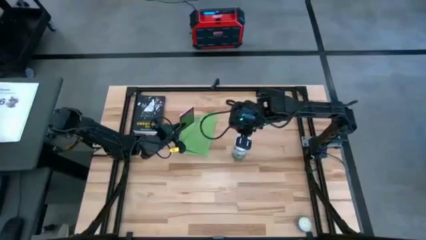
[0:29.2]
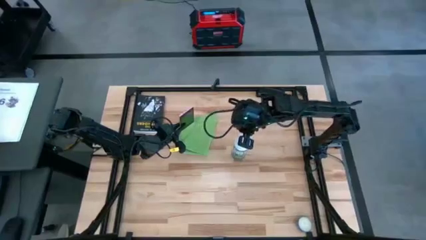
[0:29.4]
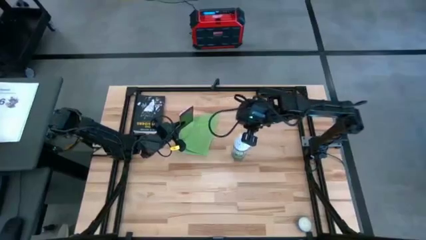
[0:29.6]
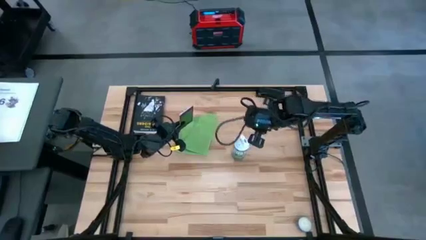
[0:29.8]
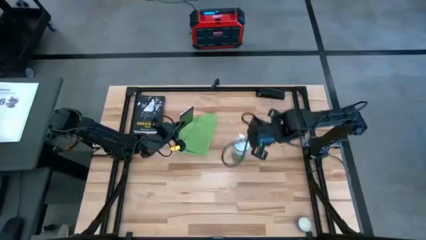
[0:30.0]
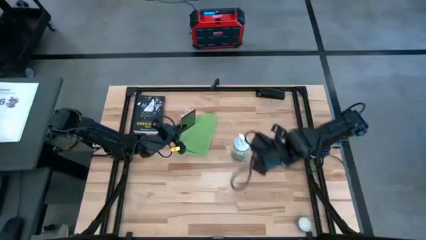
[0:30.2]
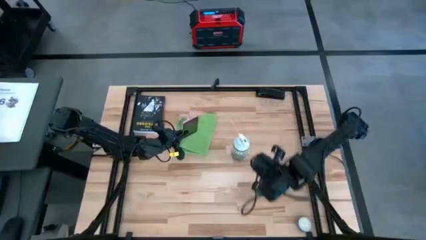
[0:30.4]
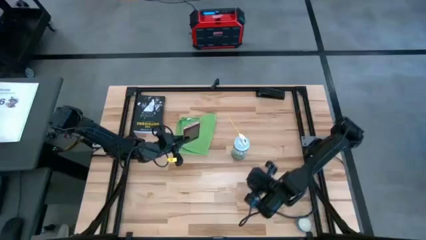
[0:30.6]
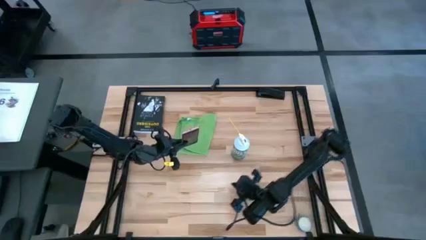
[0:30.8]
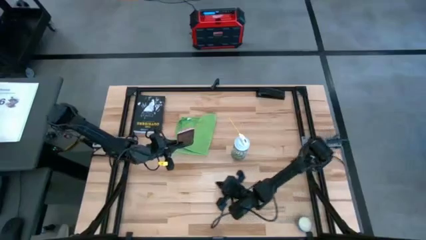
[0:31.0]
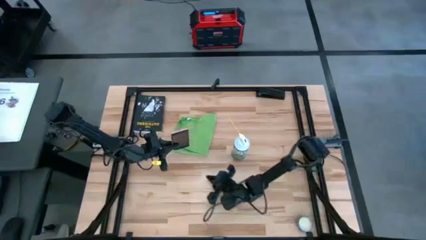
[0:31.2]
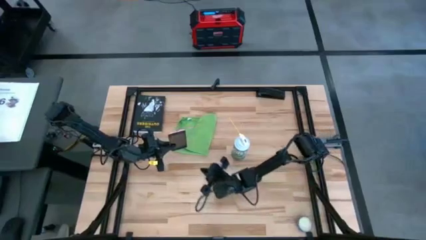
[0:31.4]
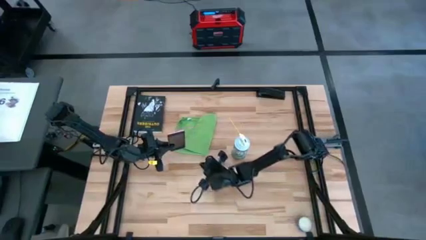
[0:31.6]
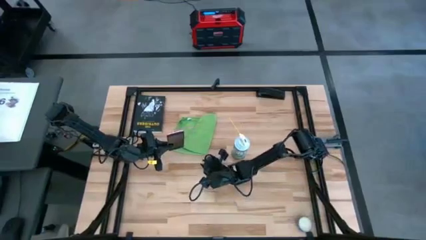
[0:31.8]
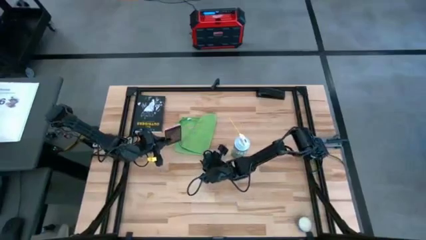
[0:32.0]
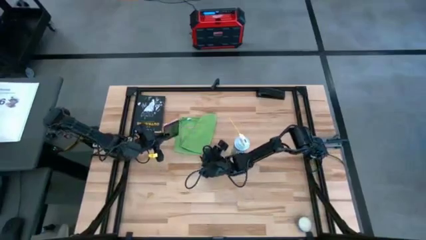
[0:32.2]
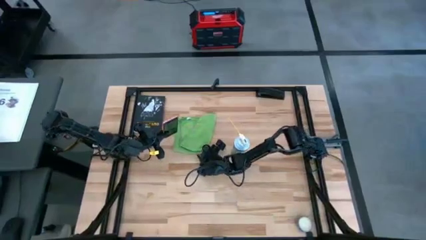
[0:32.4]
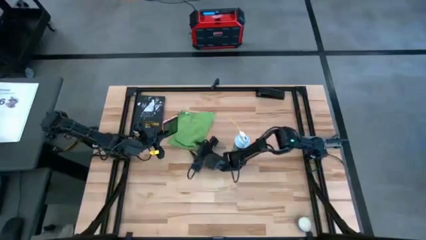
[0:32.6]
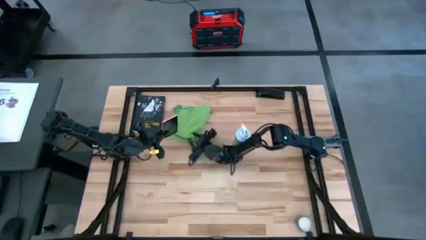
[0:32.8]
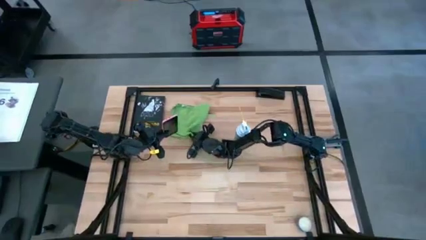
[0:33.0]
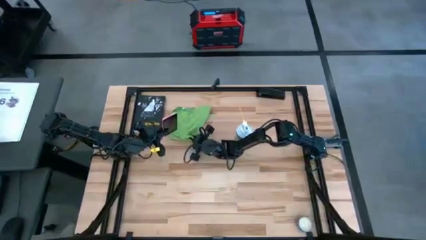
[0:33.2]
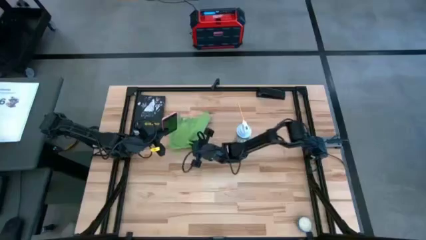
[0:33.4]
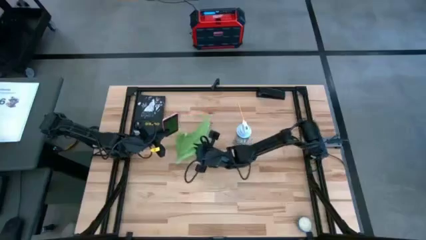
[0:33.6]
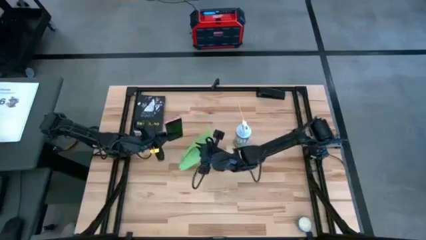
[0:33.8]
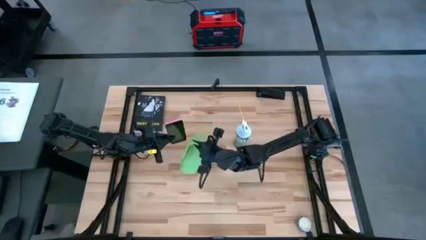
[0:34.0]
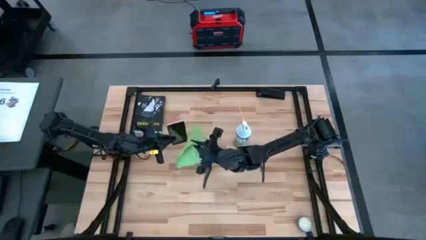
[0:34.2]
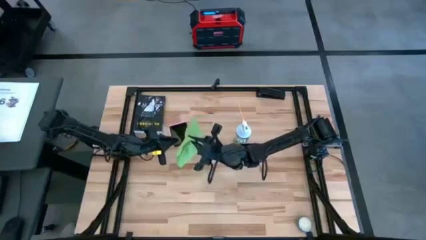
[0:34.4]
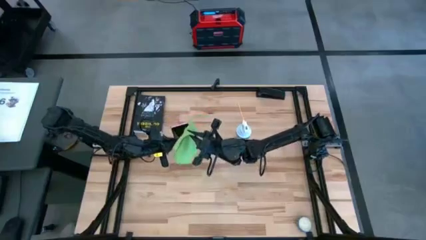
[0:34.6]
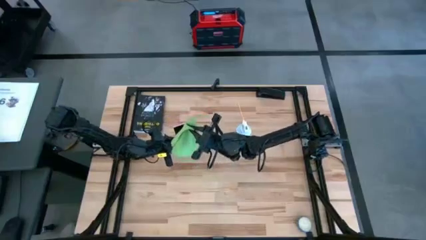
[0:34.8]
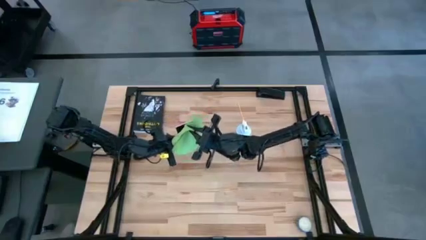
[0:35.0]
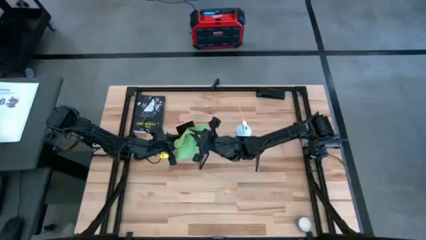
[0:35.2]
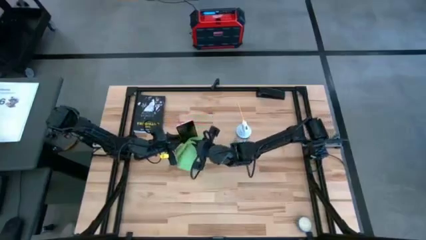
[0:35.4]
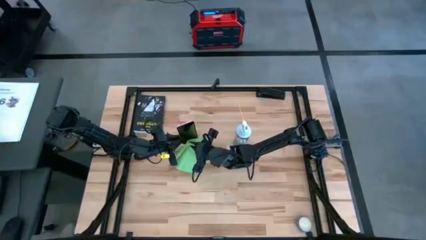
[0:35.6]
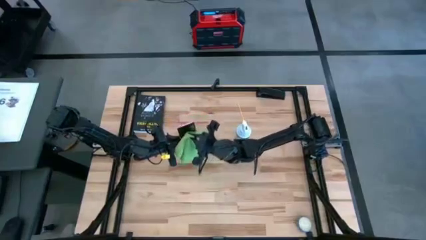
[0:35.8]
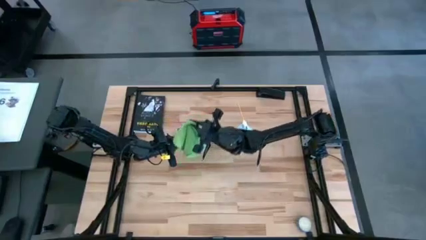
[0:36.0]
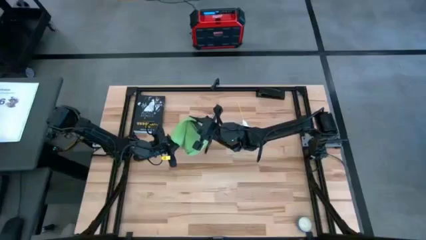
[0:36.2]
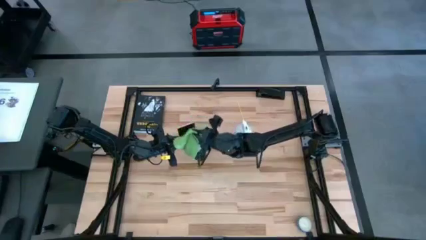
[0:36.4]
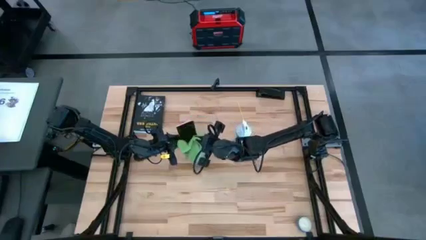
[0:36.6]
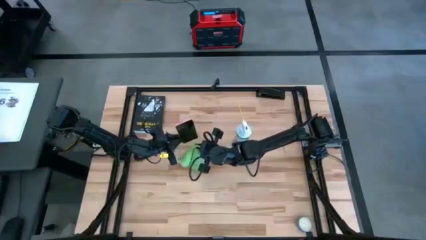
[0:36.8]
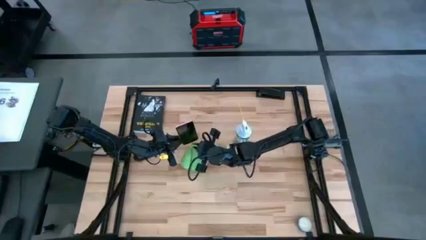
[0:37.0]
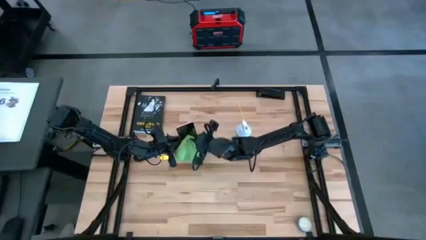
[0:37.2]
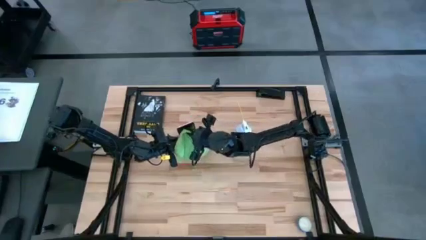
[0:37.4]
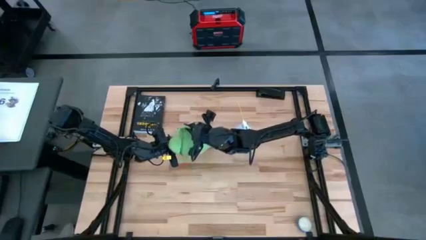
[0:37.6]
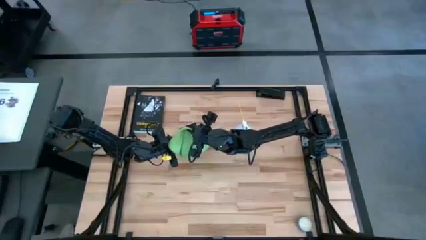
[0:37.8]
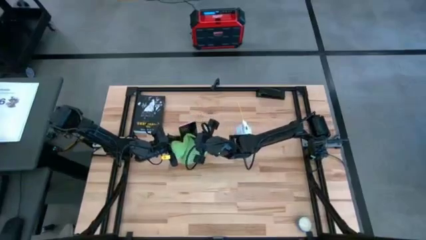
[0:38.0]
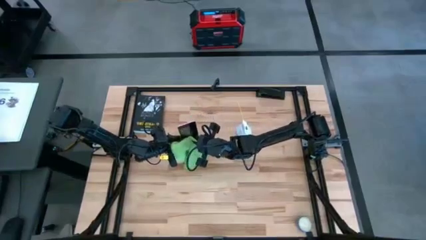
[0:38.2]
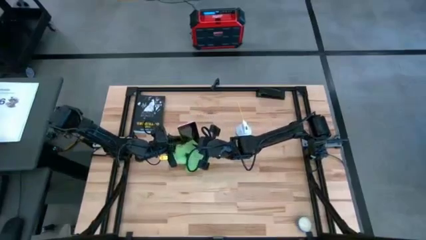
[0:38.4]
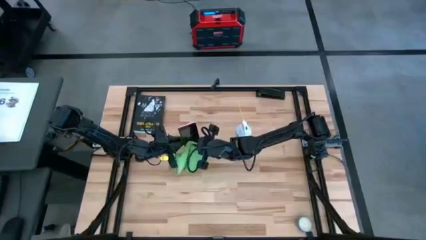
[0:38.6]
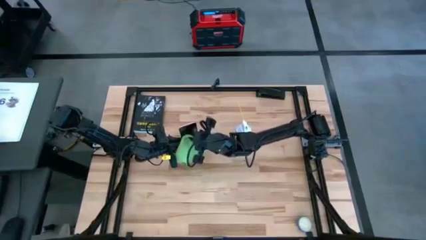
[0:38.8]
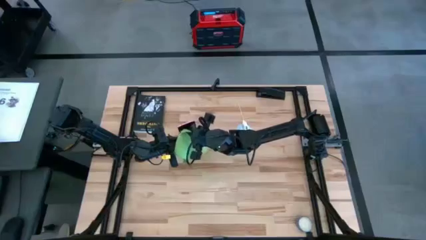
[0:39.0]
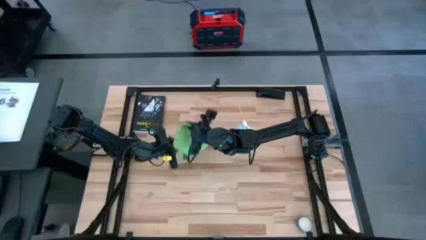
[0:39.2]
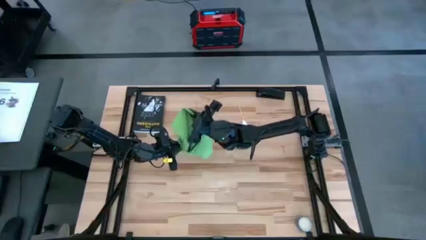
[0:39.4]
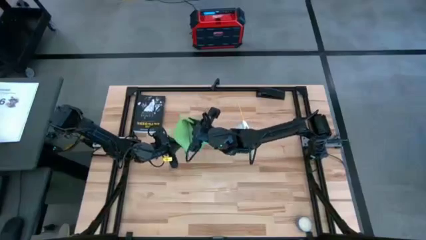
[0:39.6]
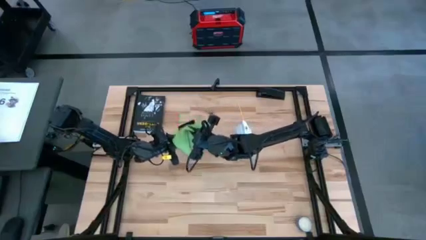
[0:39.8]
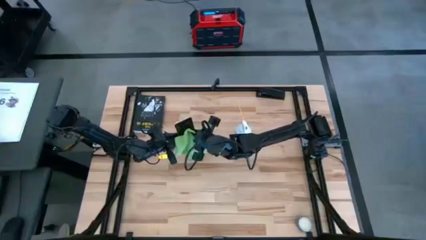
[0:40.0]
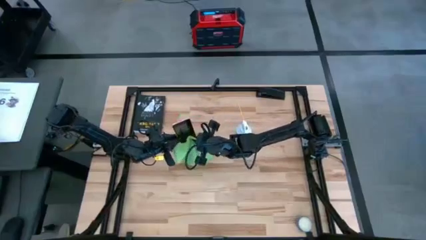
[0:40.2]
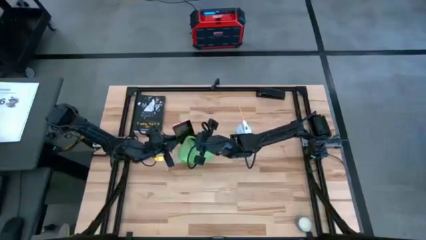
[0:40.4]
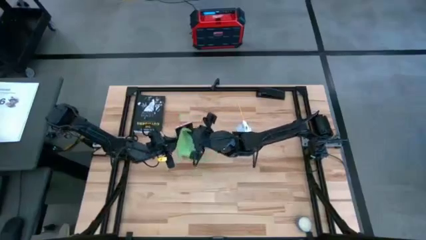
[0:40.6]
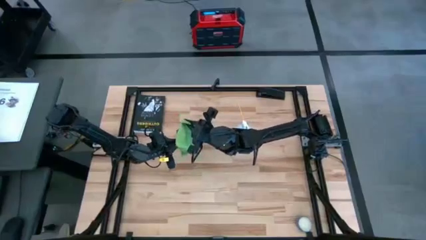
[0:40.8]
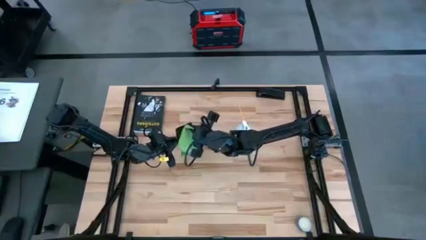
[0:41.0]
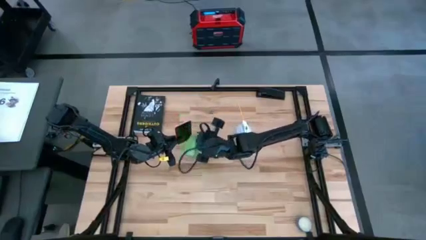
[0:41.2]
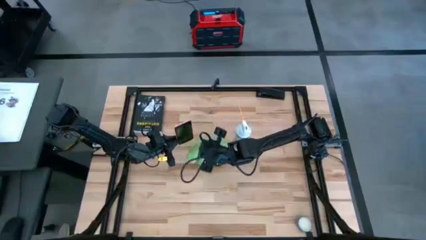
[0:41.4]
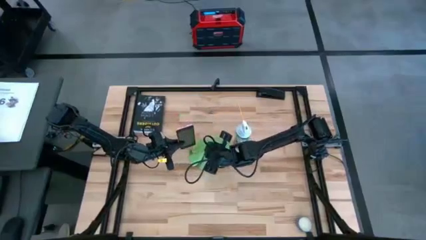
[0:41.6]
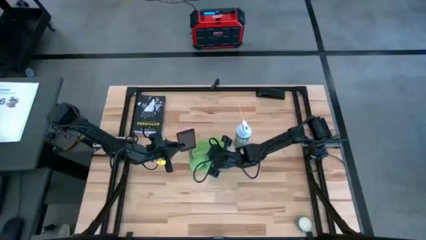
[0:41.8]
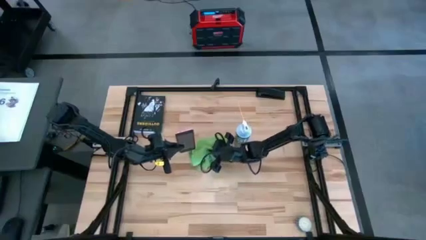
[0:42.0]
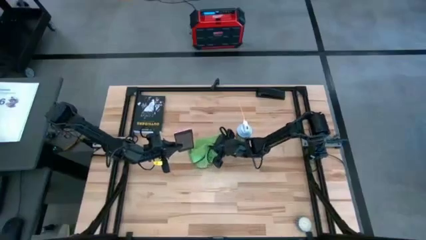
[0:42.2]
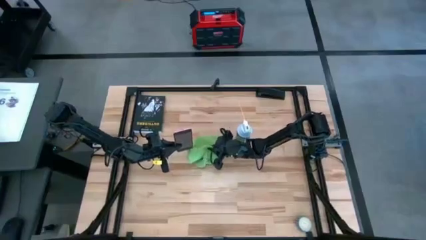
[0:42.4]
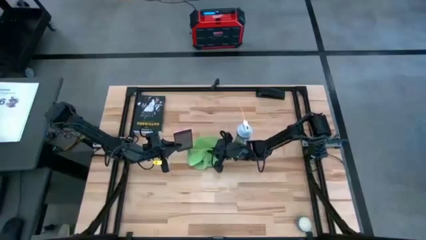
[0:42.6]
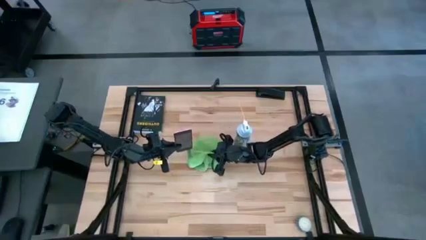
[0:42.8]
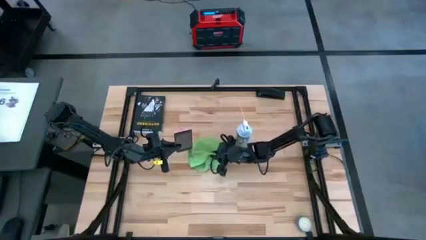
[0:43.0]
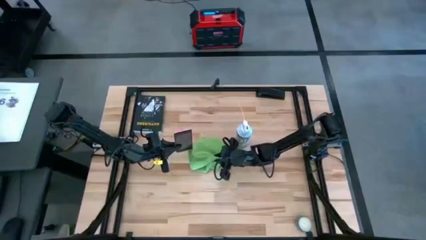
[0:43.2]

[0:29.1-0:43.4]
Task: Apply microfiber cloth
Wipe the pink cellphone with the green microfiber cloth

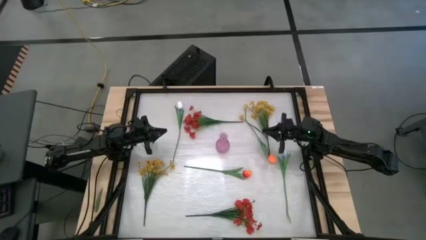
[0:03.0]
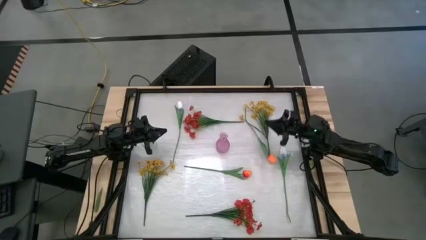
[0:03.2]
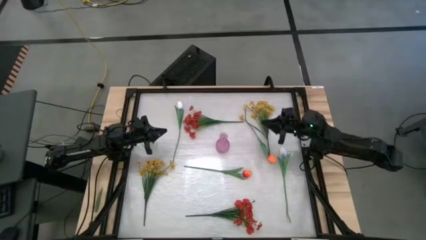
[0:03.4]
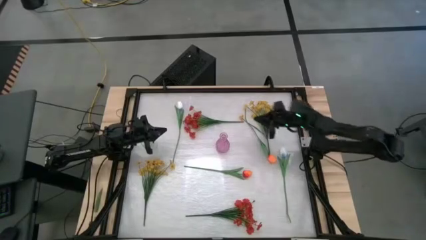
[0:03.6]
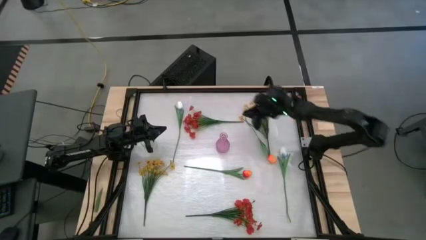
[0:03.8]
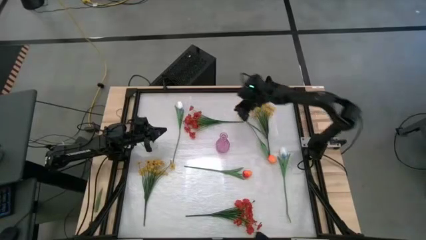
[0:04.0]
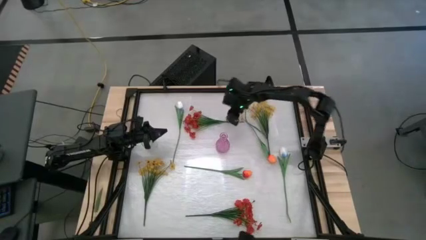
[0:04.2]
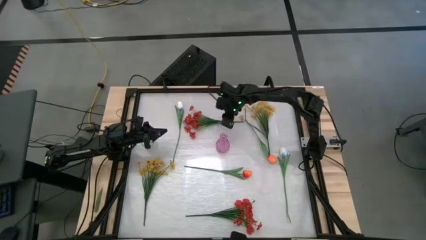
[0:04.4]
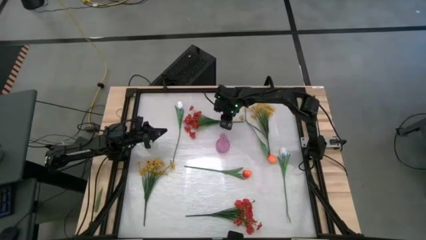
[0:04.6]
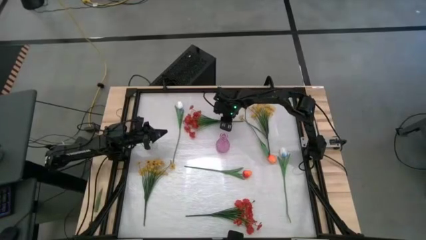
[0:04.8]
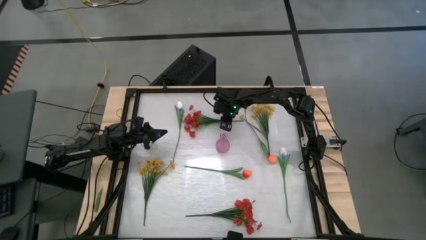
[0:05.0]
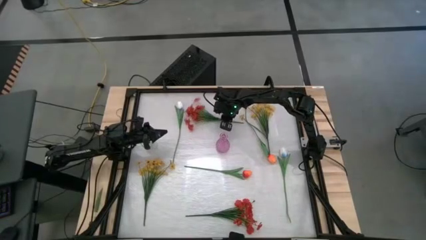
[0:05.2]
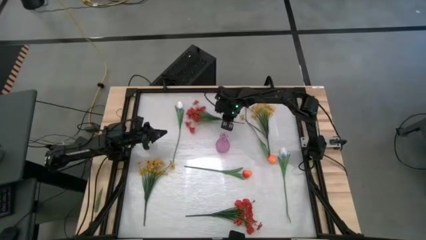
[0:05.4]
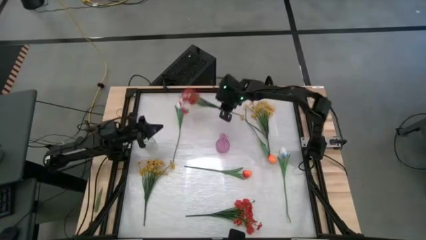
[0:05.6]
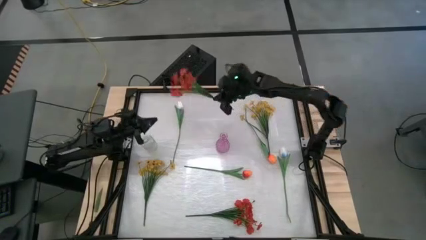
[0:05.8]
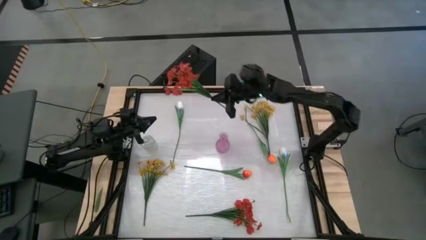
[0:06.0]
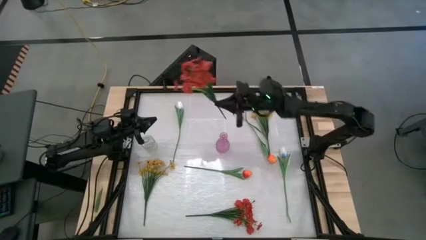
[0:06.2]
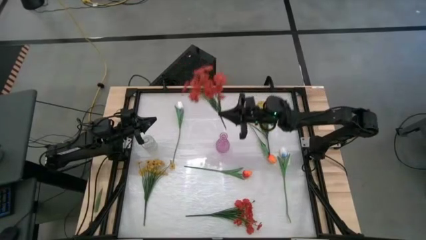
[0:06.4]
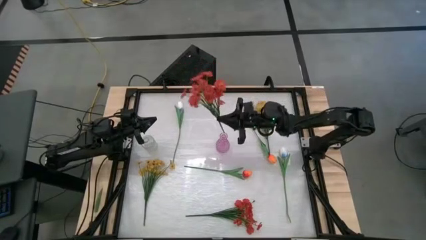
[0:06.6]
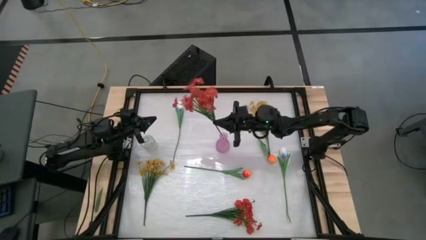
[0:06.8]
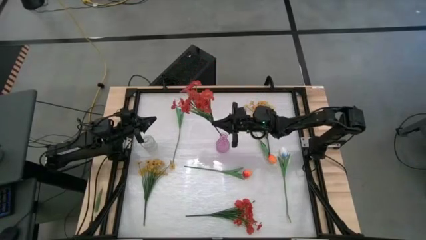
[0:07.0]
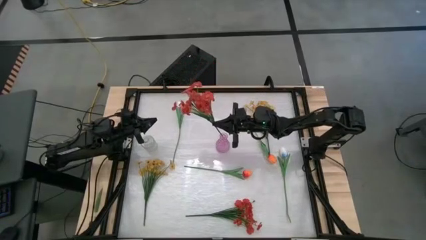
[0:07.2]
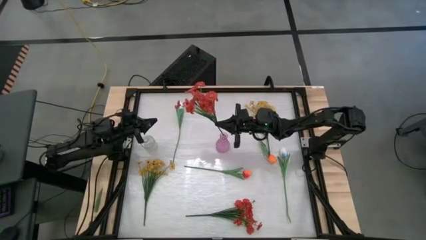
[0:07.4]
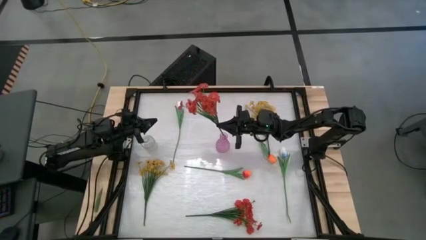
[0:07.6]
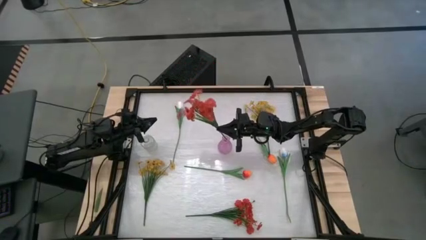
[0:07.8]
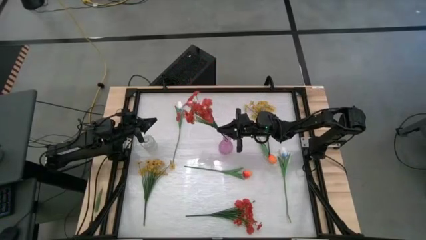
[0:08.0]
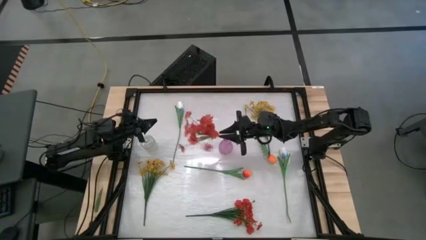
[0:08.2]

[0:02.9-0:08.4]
Task: Sort flowers into vase by color
Put the top orange flowers into the violet vase
